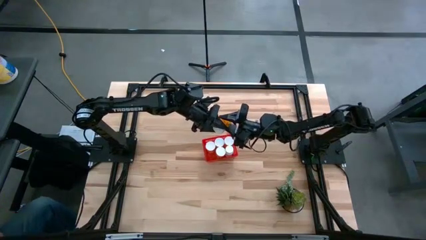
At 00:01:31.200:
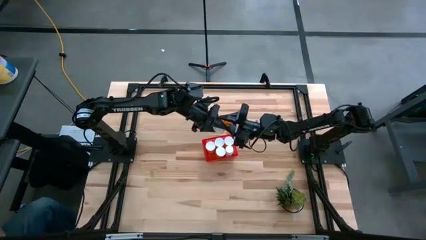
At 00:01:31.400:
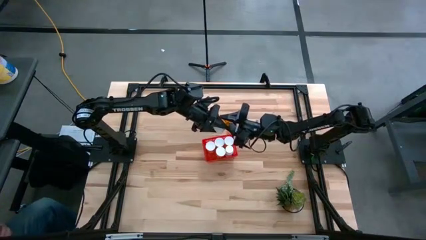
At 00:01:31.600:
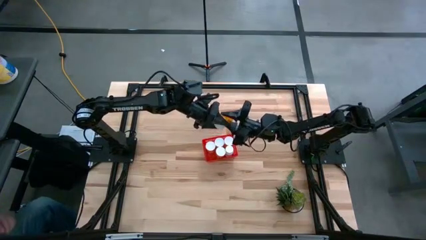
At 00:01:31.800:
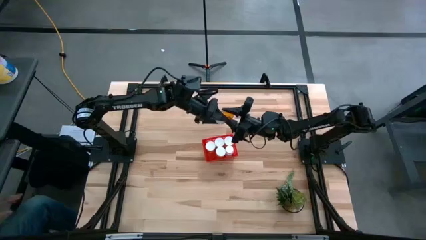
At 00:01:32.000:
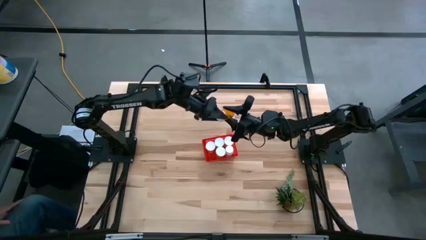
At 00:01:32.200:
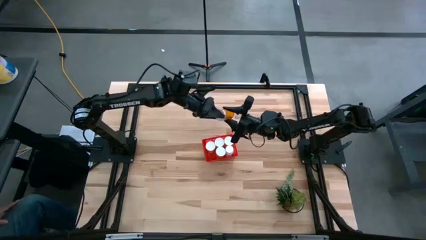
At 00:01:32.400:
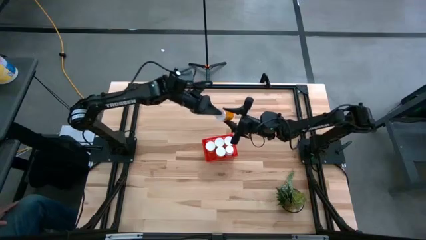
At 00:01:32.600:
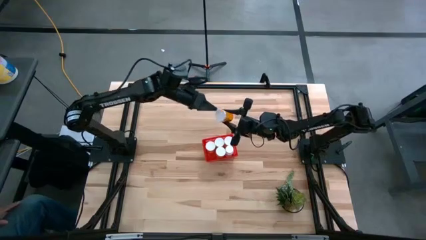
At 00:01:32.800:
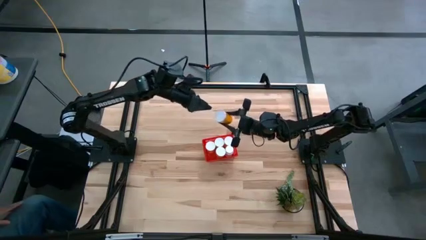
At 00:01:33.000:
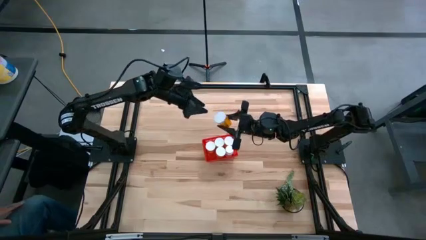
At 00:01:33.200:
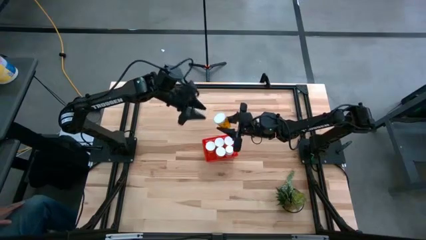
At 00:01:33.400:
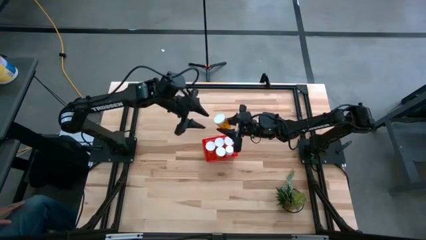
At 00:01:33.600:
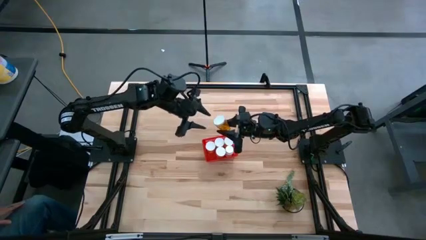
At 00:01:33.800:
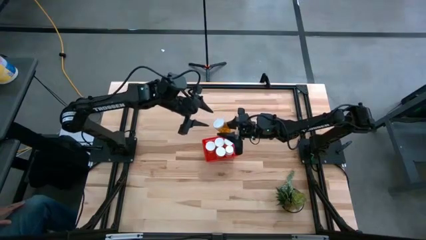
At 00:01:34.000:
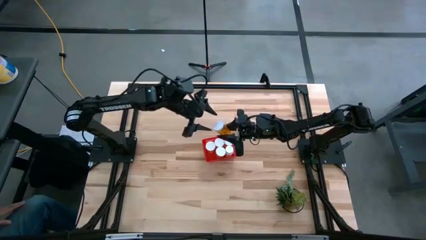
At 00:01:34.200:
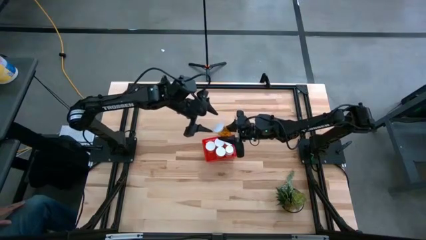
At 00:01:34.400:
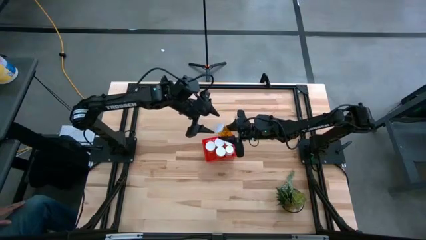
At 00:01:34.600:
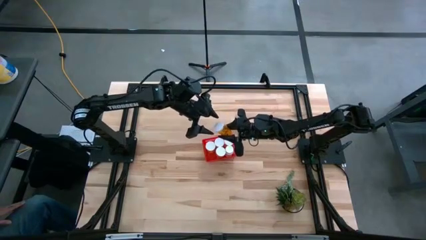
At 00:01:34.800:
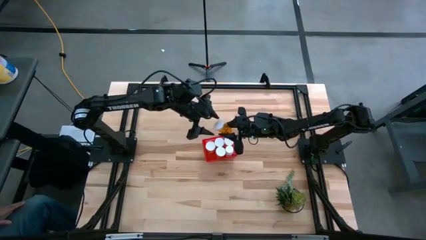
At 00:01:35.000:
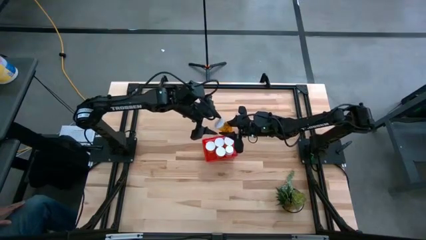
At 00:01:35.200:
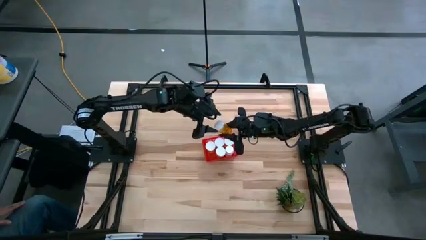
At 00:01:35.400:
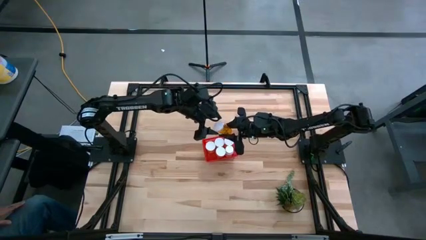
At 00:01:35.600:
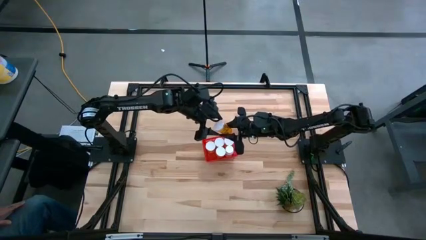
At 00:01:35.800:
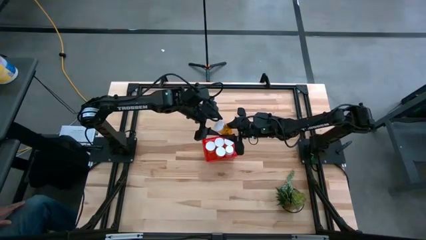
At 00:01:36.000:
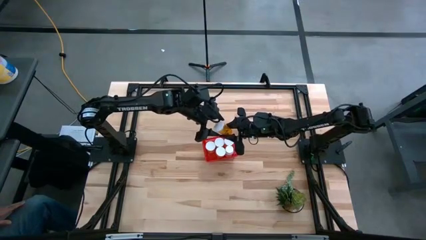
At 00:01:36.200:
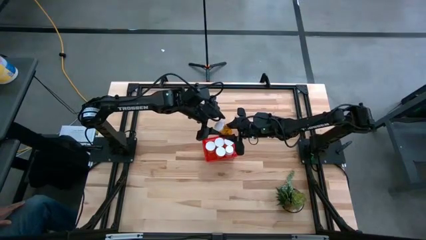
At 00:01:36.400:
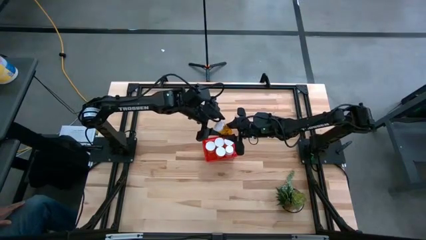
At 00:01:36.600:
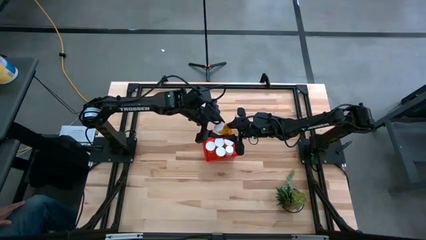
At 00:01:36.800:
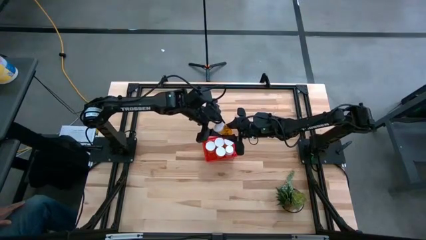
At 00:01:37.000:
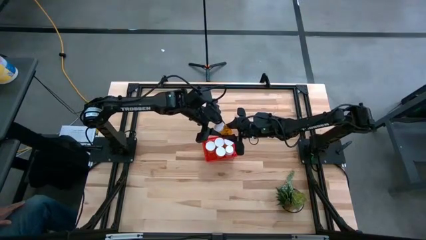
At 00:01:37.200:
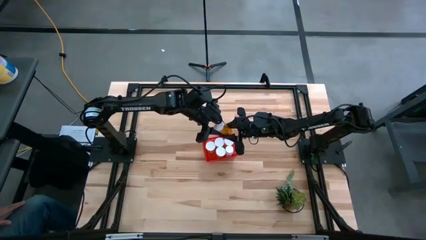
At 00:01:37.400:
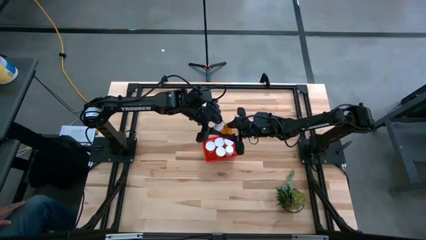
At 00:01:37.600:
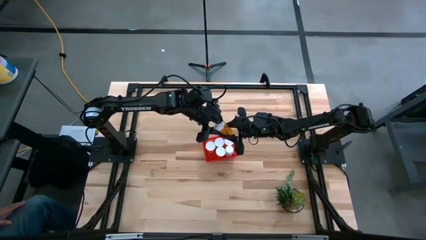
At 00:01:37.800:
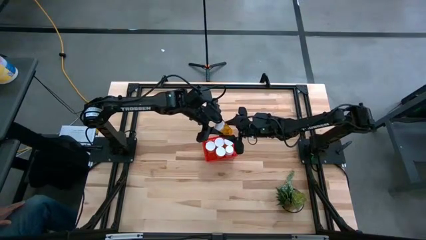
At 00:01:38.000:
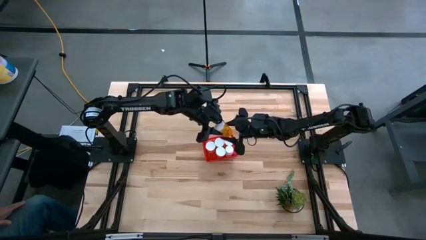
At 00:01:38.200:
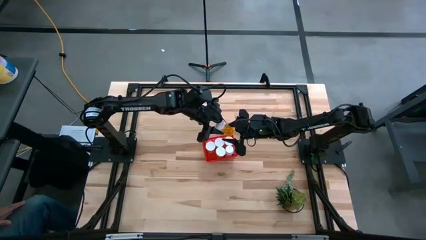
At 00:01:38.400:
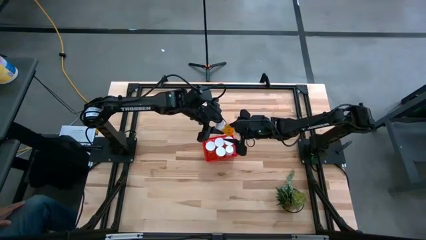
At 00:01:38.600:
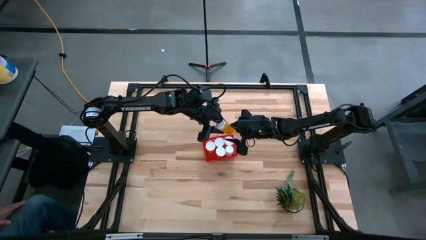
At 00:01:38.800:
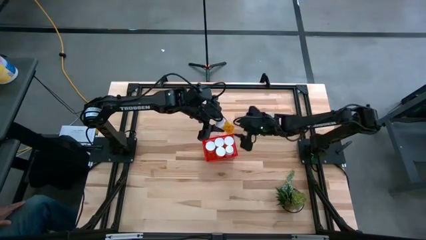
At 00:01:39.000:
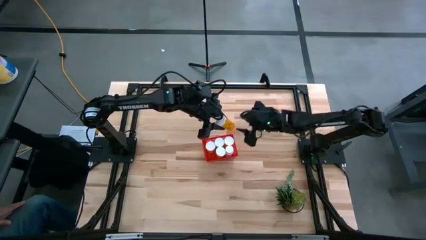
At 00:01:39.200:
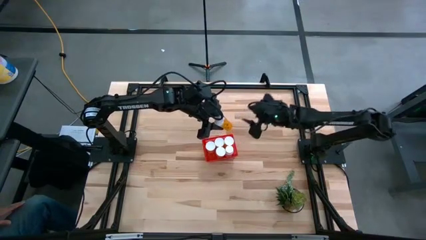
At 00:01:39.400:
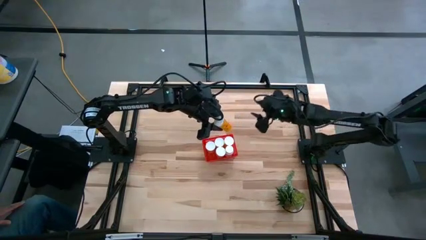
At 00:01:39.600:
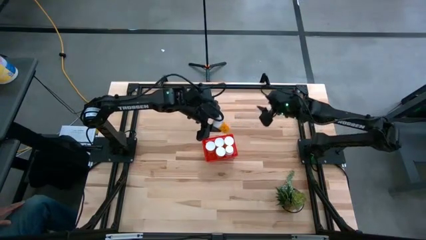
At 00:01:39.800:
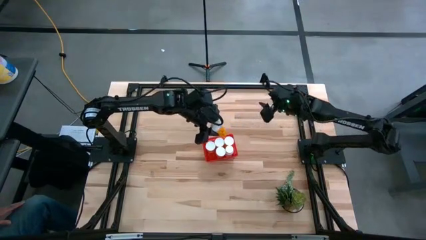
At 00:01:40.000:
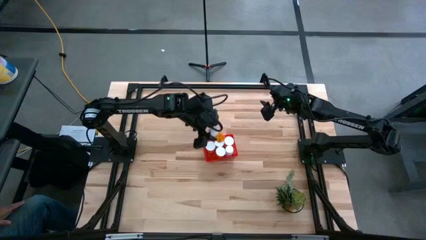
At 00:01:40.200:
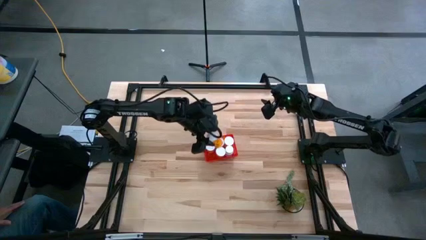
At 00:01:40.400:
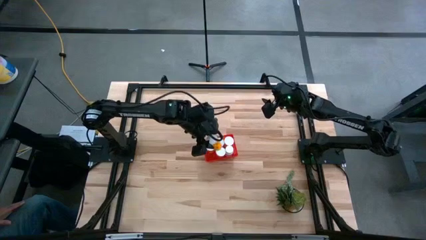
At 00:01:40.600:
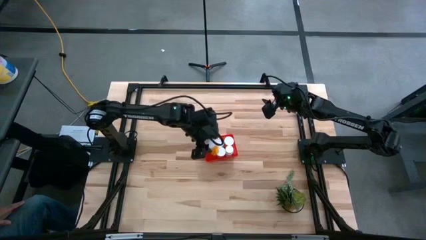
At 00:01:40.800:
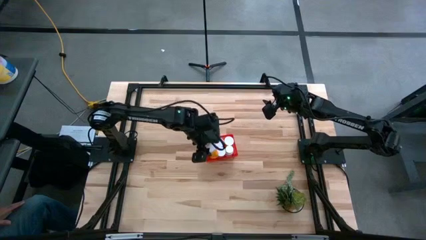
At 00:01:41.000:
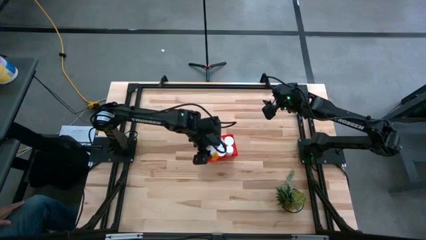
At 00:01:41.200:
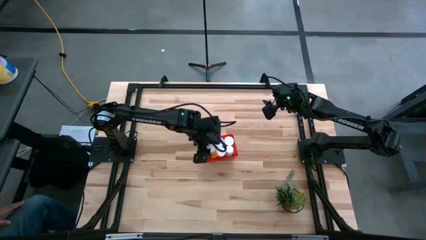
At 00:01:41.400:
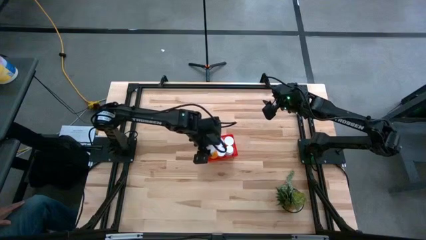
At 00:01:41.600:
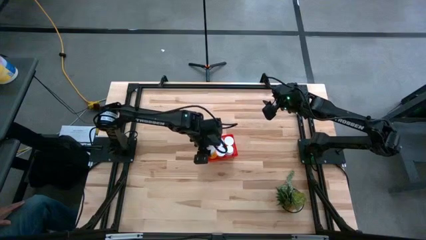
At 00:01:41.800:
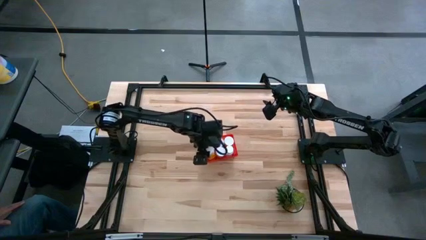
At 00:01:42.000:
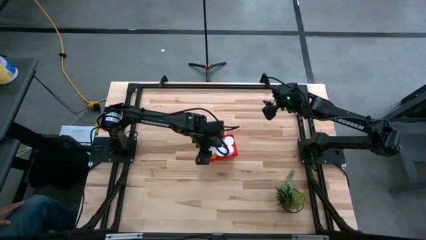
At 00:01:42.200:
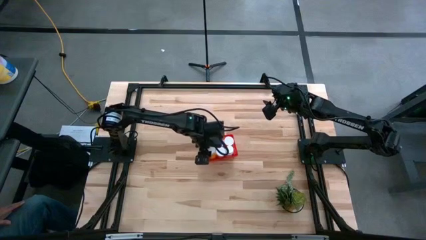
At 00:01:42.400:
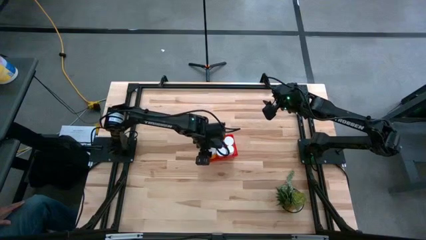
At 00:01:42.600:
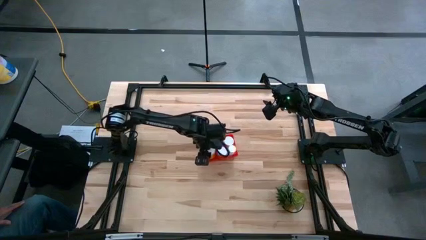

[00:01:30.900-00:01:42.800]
Task: Pick and place pill bottles into a basket
Put the orange medicine bottle into the bin

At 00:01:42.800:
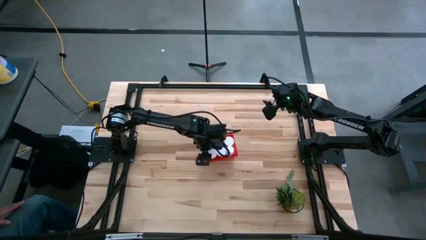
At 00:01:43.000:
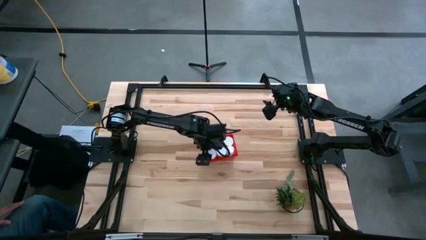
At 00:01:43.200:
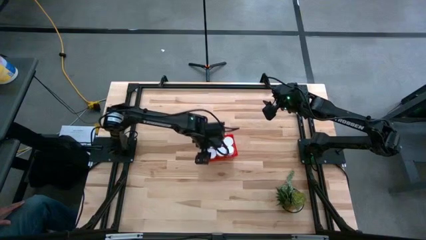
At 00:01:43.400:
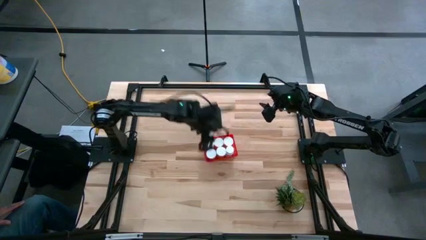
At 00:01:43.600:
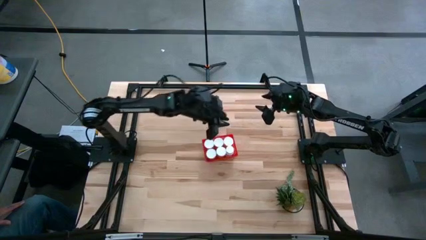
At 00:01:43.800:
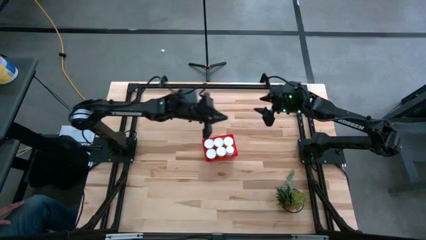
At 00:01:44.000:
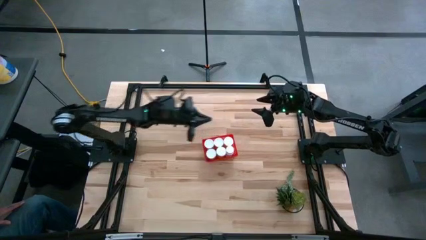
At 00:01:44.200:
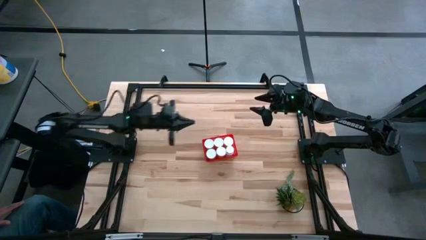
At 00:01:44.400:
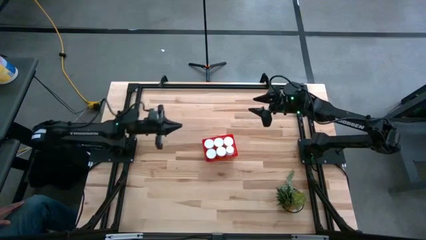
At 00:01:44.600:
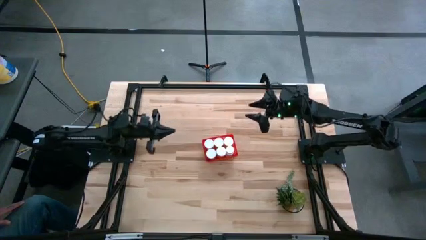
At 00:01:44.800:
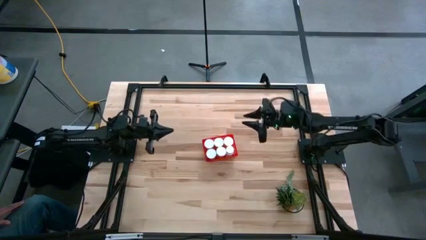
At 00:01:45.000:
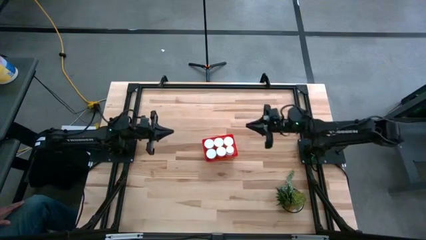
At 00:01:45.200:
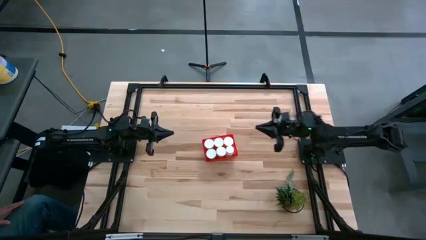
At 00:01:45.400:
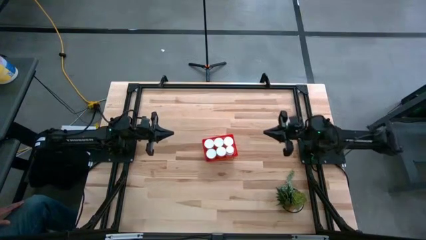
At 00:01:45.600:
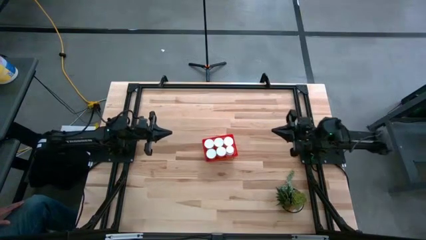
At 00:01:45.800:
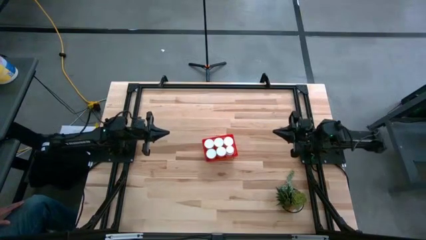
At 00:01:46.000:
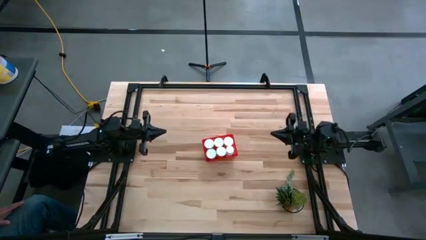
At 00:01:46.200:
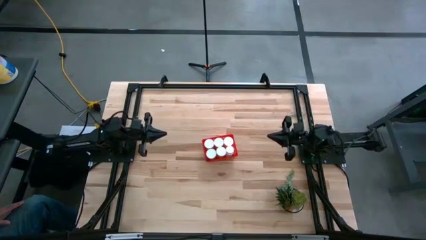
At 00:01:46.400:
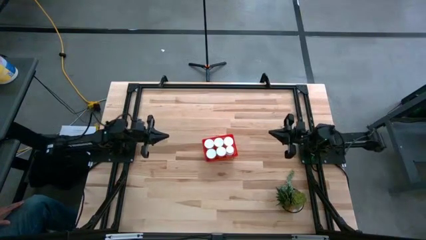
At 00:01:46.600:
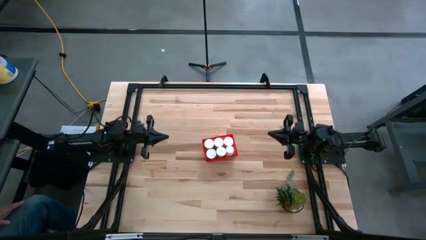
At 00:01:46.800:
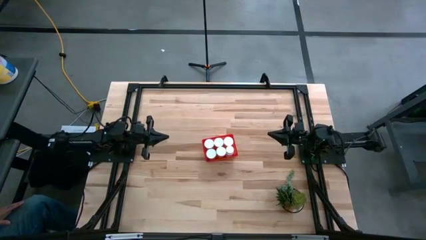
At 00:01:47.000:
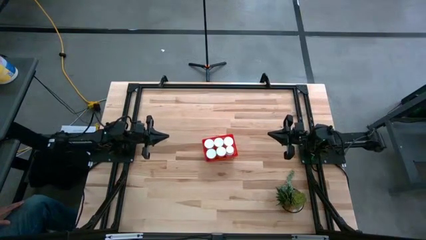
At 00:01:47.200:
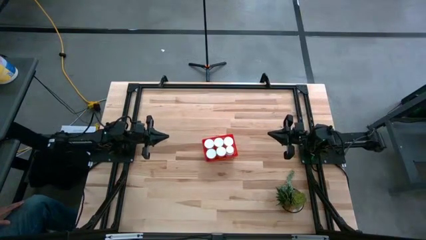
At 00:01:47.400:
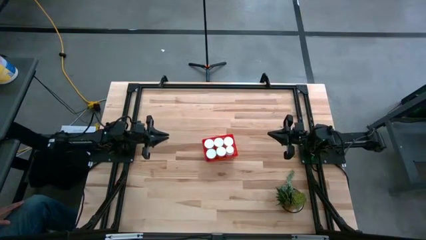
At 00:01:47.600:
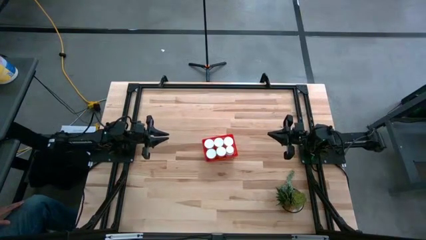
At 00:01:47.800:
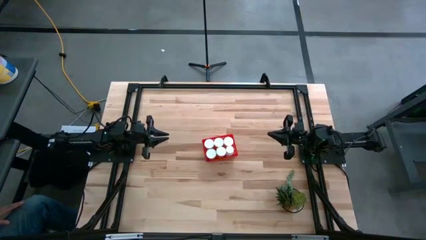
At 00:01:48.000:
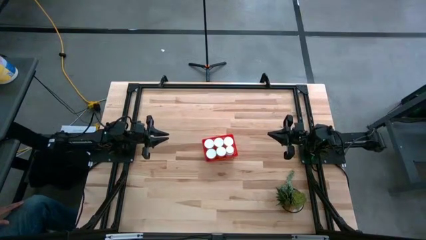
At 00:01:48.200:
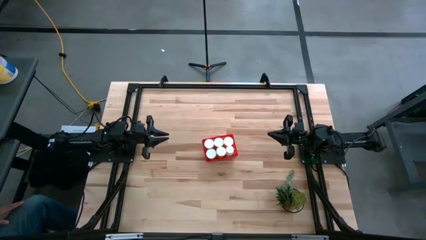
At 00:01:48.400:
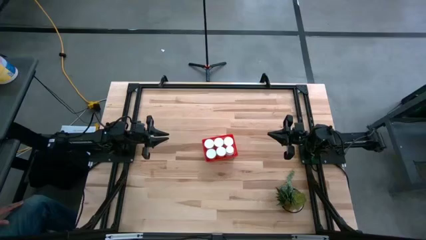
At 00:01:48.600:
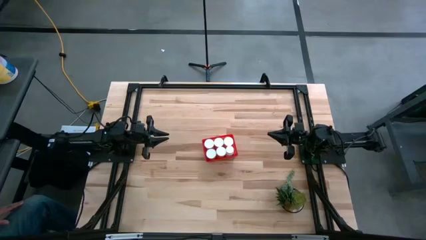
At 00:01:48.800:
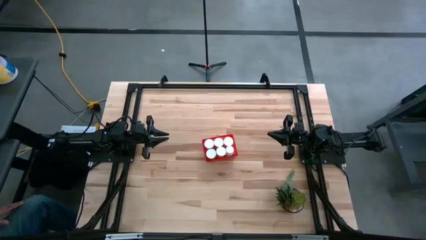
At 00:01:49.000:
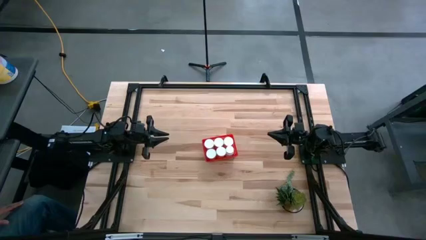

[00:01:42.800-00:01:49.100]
Return to Home Position
